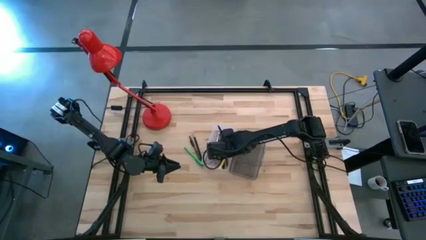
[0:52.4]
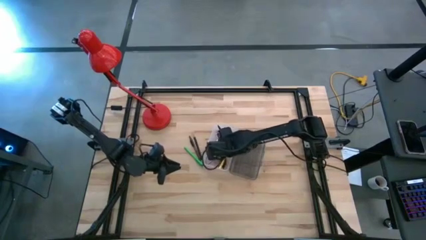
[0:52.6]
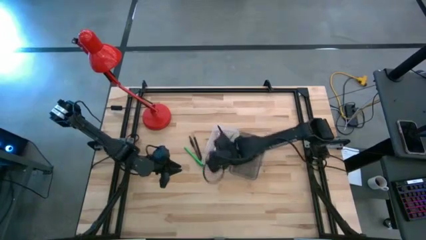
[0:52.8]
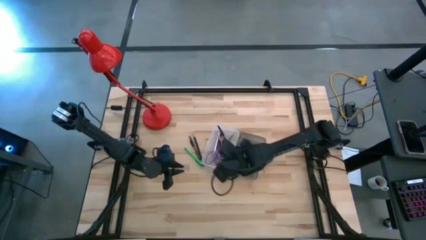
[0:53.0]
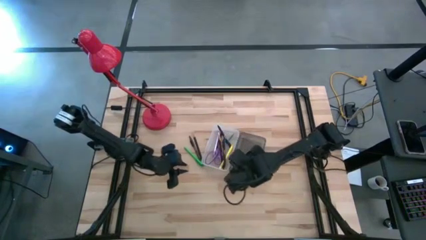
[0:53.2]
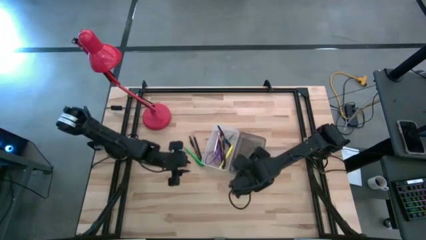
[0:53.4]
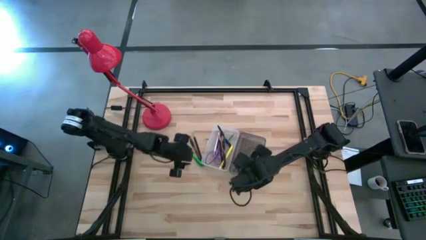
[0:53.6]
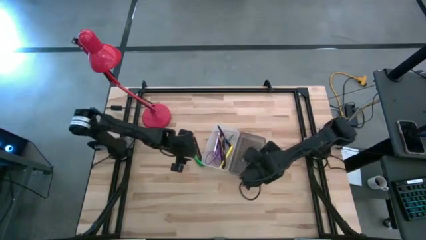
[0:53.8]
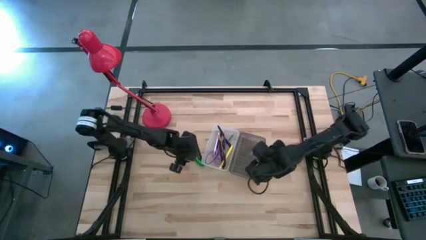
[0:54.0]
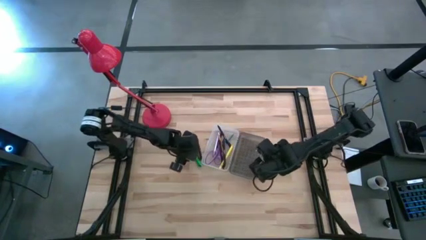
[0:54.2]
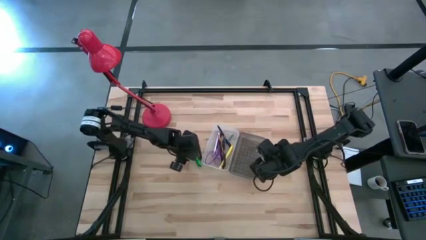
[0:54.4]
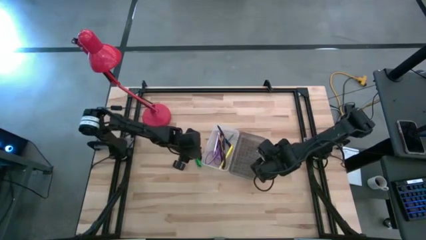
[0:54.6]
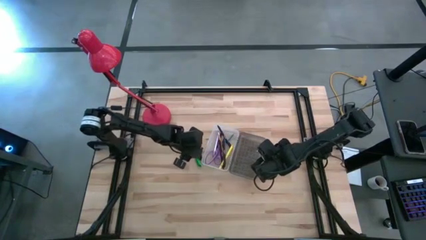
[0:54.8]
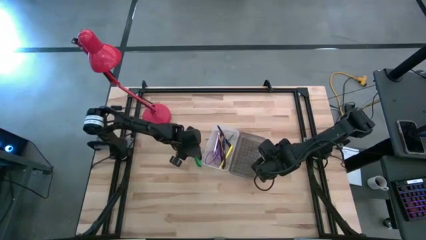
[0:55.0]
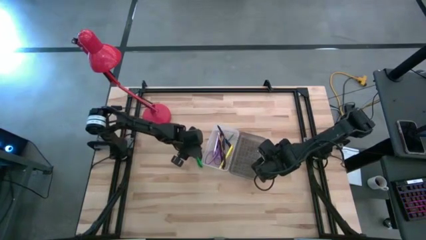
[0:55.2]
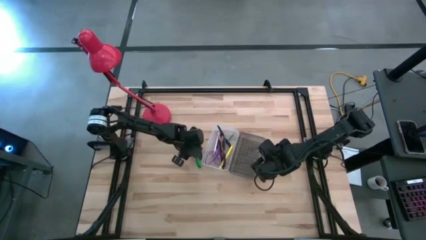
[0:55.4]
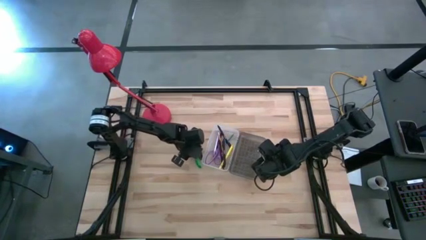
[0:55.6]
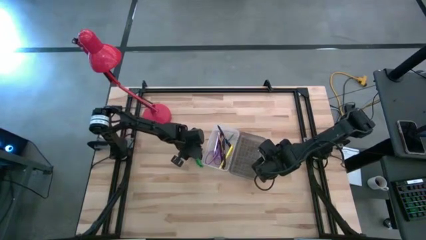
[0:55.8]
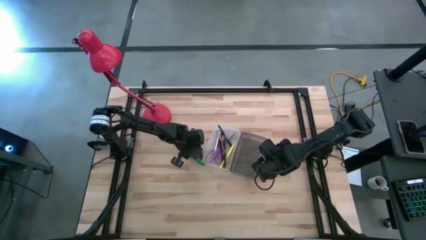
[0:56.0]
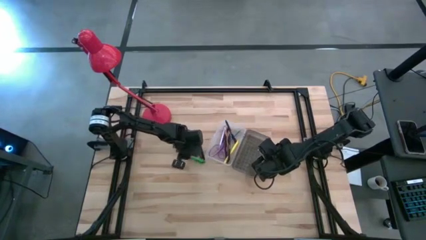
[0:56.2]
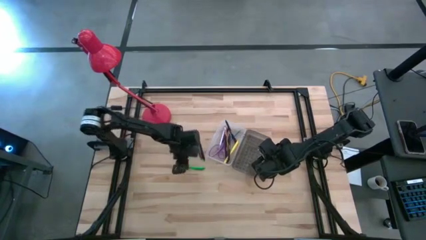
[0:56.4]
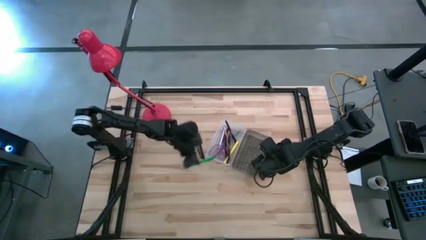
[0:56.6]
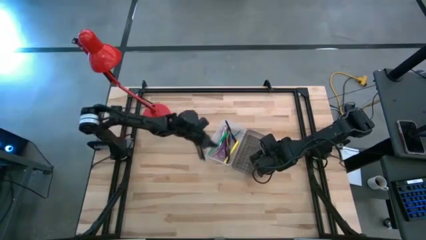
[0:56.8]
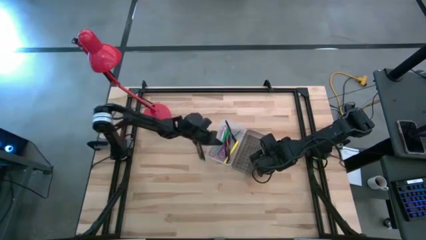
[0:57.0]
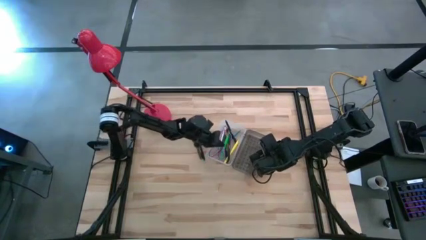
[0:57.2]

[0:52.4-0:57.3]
Task: Pick & place school supplies into a supply box
Put the green pen into the supply box

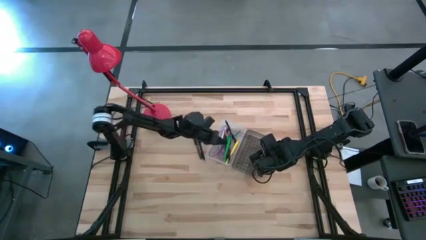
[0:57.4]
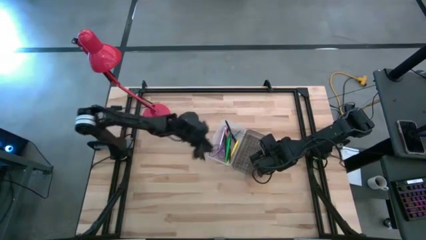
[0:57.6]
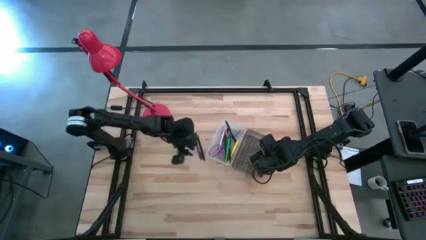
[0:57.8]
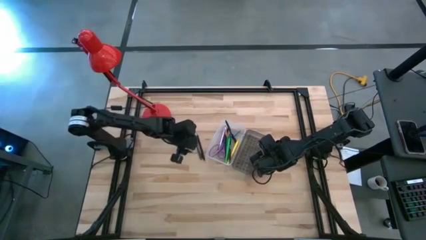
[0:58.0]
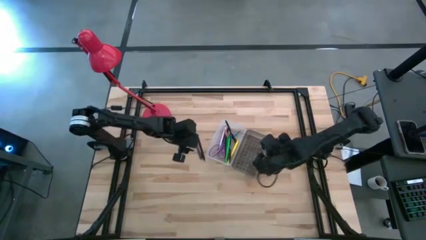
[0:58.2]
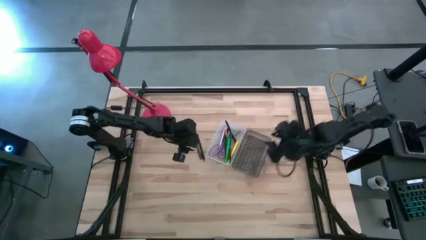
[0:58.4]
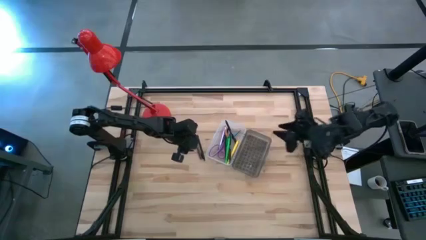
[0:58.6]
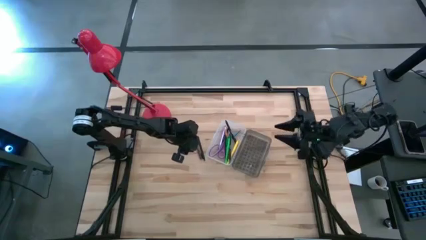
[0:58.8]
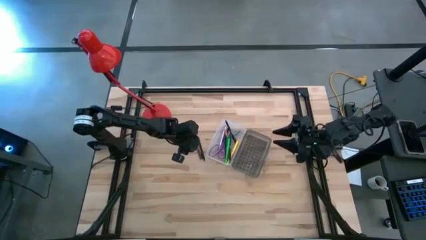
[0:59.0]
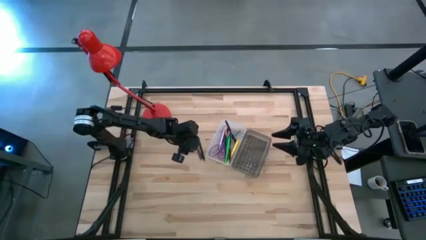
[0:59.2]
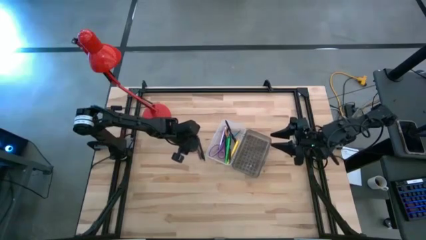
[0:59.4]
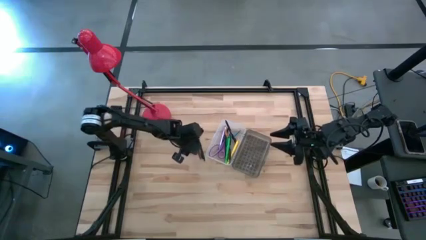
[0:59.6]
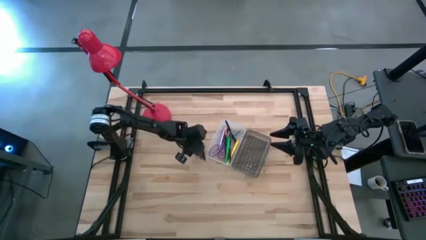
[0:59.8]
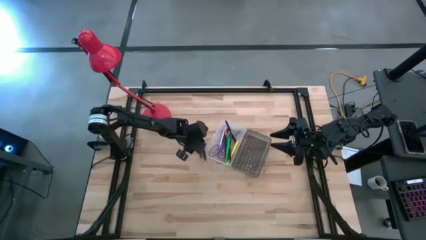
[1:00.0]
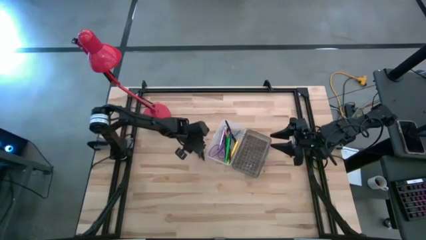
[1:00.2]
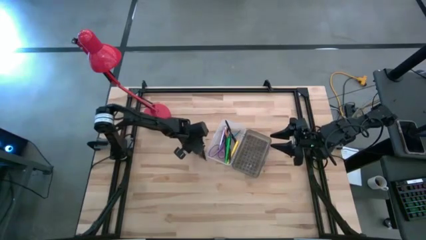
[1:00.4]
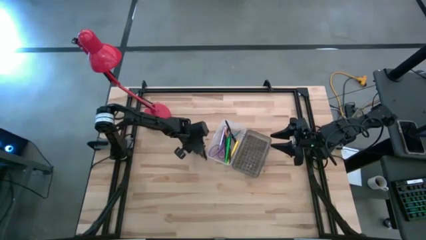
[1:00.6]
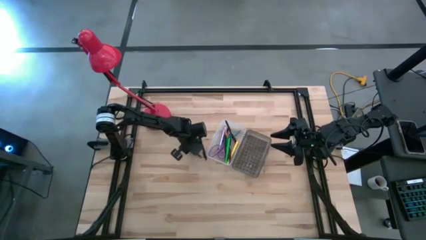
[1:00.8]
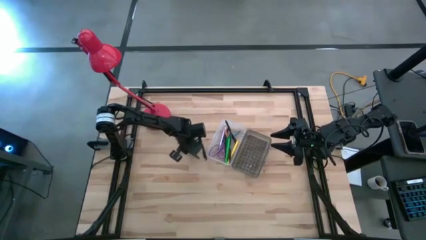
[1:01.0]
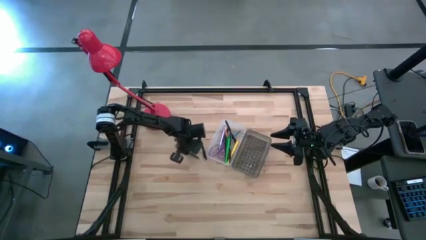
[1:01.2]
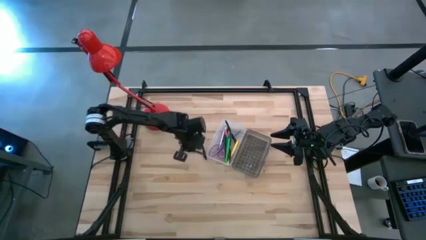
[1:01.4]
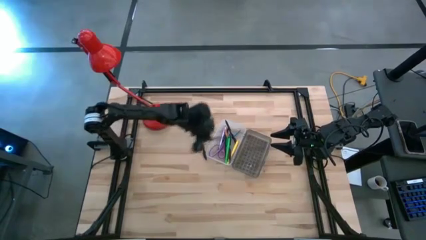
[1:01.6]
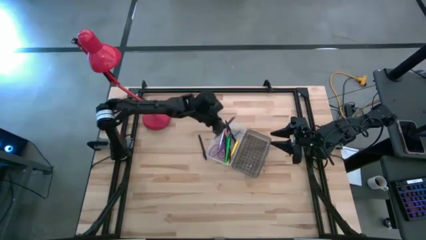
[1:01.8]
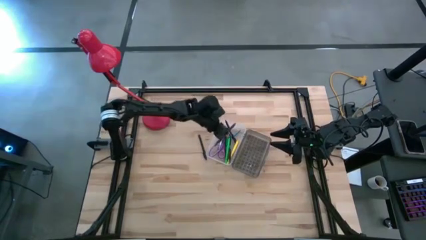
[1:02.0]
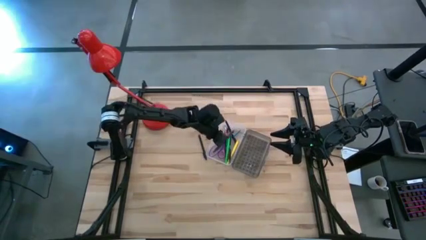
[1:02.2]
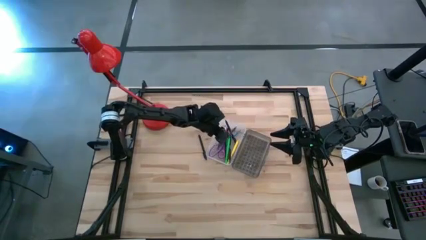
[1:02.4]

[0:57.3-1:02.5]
Put the brown pen into the supply box

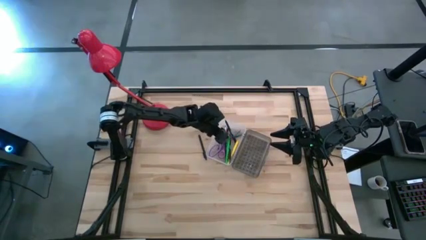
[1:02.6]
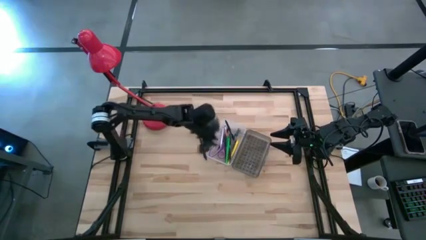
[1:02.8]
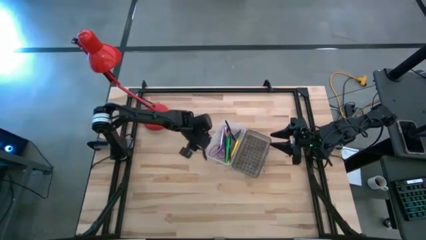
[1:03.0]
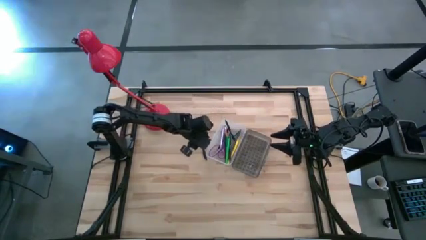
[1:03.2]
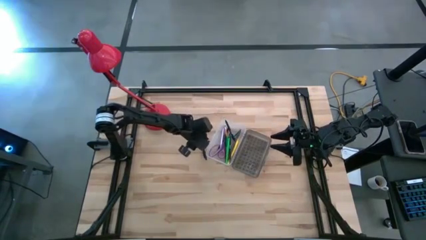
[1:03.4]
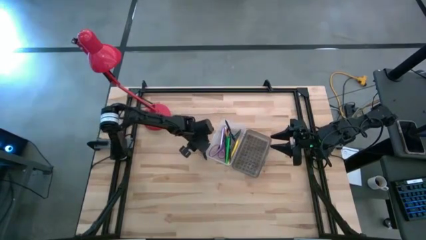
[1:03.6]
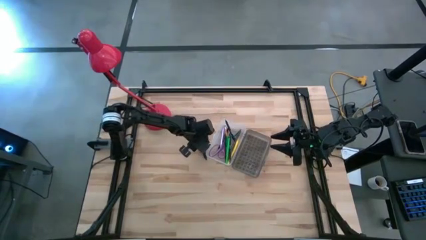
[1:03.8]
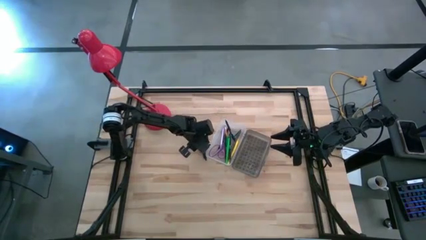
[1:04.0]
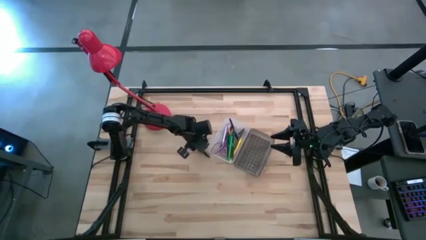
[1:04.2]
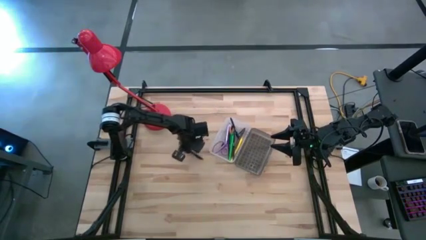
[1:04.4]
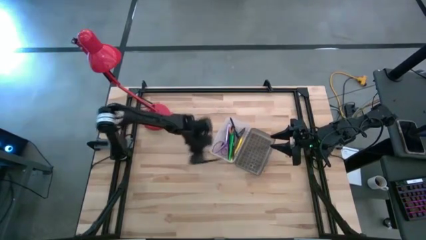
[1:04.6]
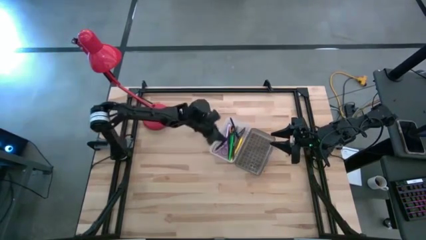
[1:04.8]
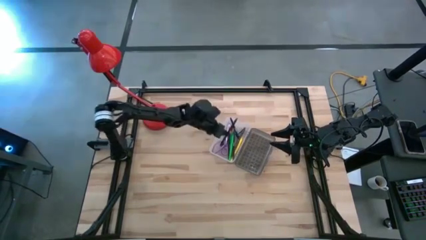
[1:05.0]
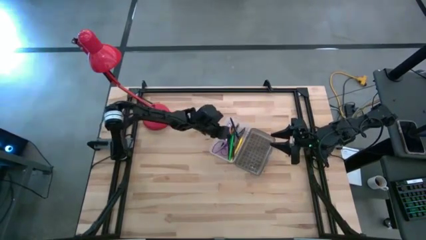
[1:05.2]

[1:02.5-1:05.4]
Put the black pen into the supply box

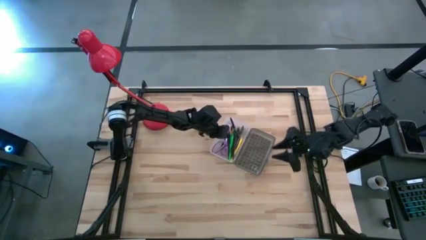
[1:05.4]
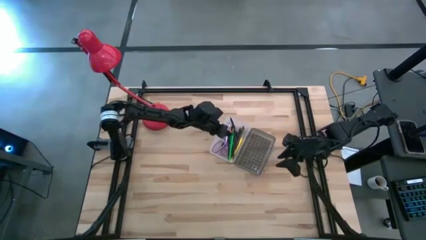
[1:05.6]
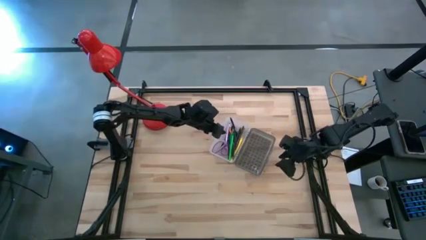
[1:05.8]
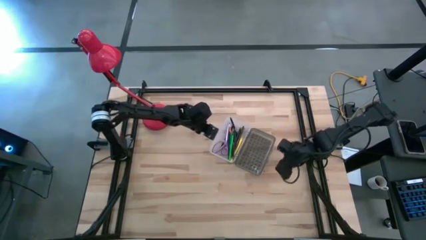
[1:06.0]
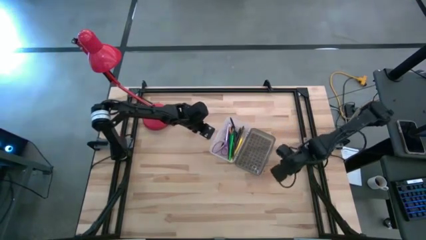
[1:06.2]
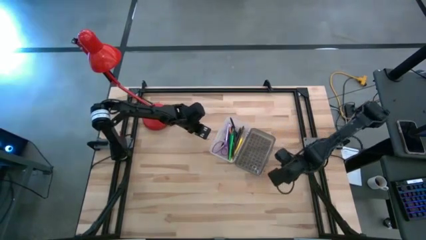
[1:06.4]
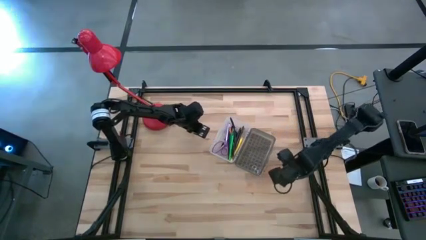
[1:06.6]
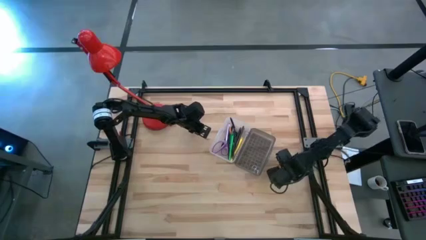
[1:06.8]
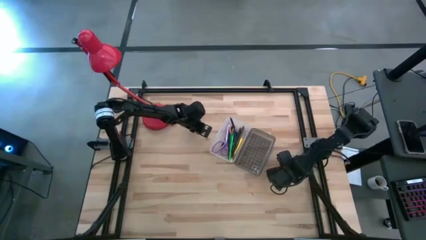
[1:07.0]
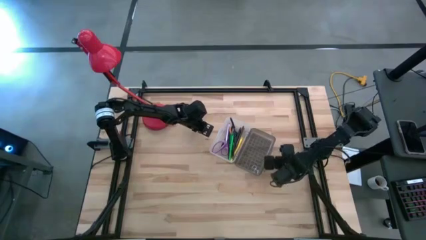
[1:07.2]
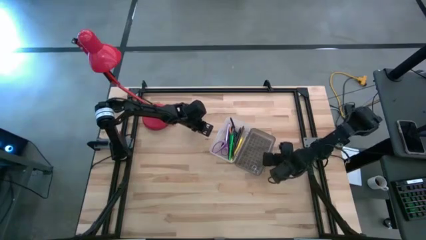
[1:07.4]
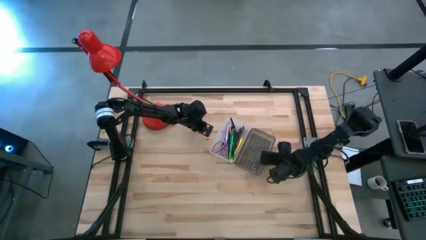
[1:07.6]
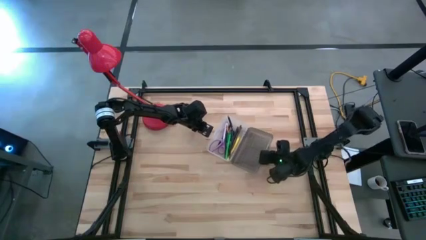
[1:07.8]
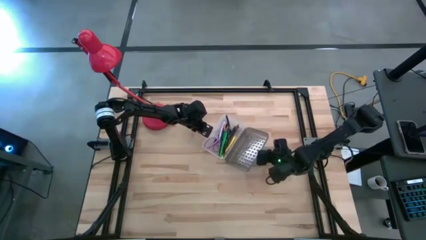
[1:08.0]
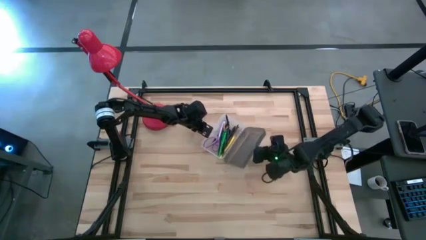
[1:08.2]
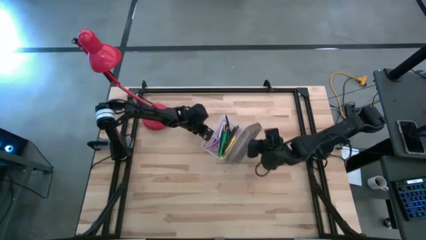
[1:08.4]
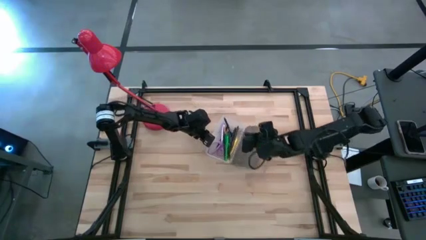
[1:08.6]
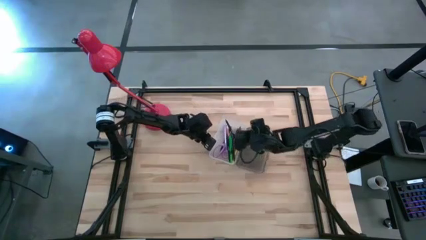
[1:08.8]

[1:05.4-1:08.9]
Close the supply box
